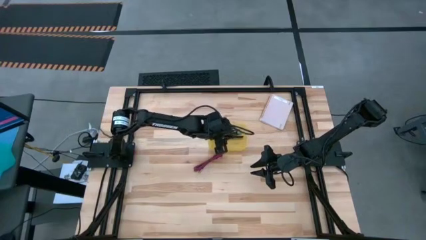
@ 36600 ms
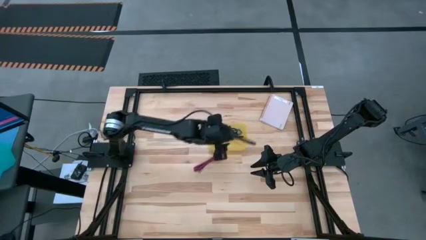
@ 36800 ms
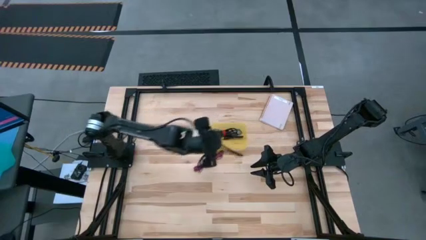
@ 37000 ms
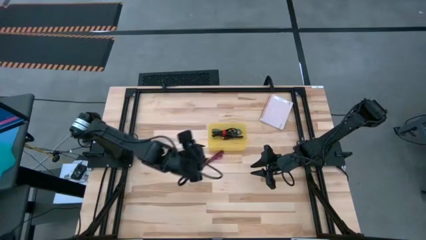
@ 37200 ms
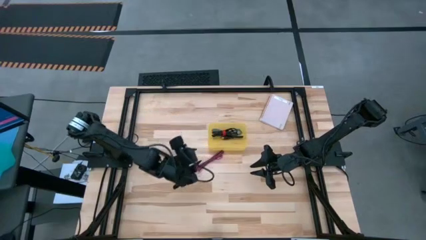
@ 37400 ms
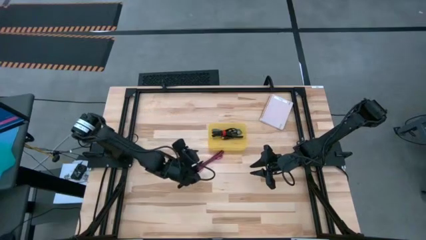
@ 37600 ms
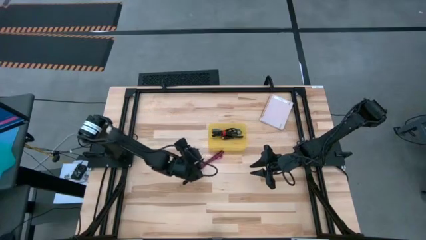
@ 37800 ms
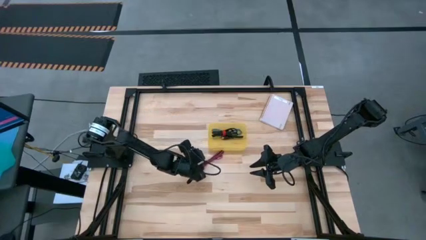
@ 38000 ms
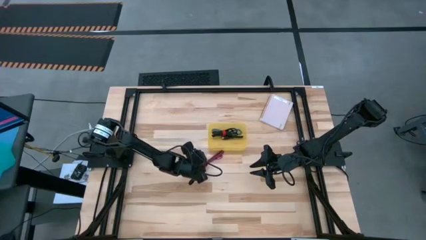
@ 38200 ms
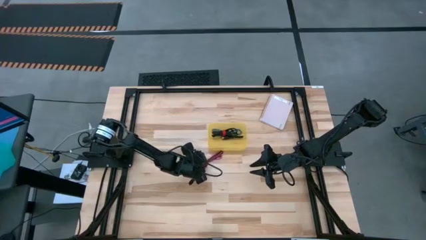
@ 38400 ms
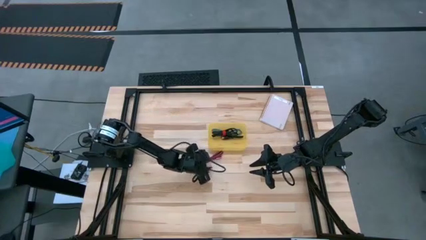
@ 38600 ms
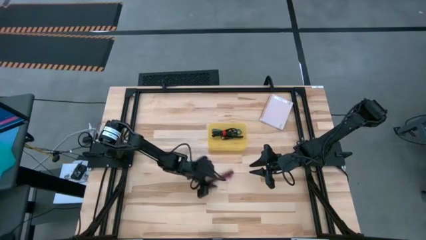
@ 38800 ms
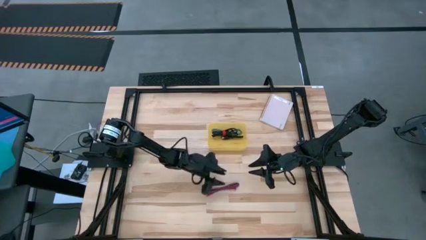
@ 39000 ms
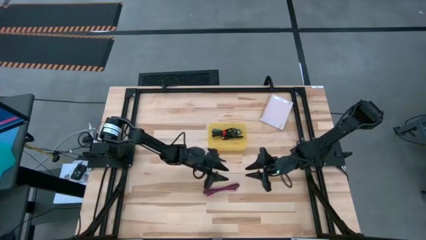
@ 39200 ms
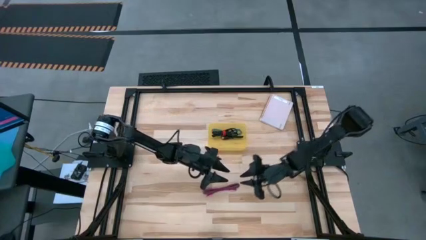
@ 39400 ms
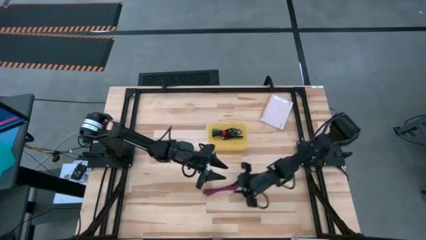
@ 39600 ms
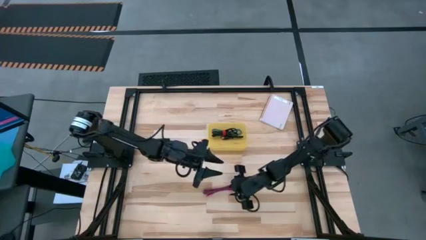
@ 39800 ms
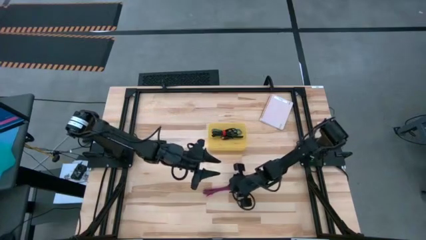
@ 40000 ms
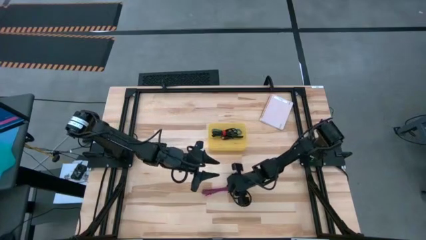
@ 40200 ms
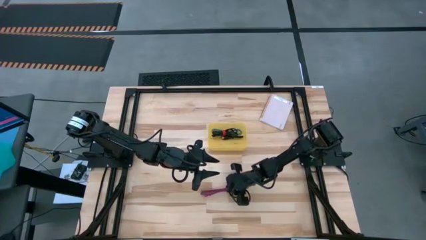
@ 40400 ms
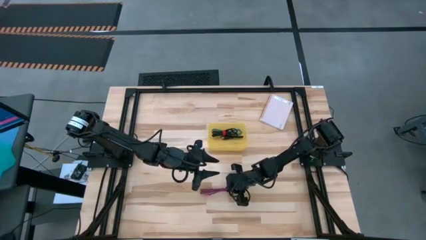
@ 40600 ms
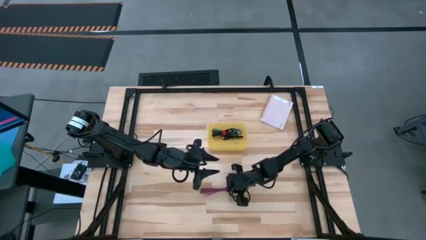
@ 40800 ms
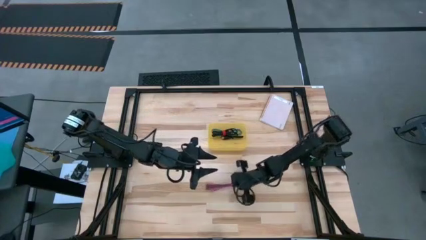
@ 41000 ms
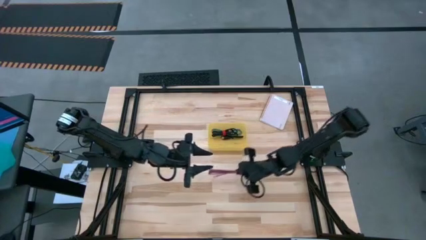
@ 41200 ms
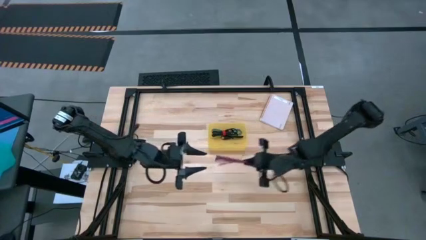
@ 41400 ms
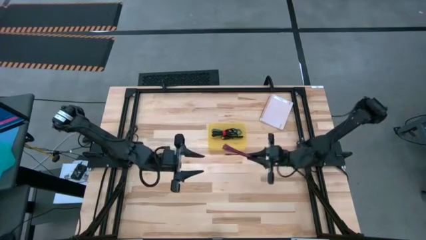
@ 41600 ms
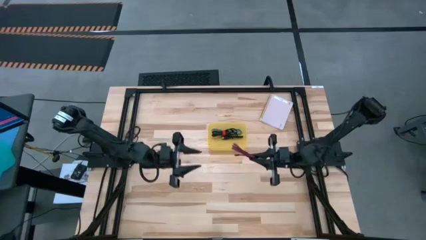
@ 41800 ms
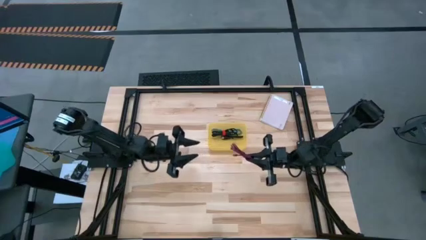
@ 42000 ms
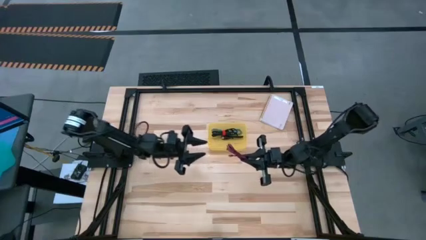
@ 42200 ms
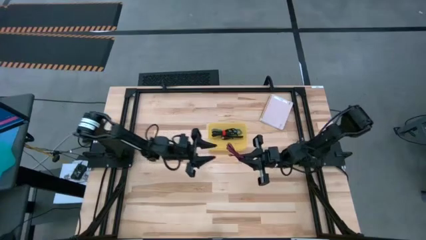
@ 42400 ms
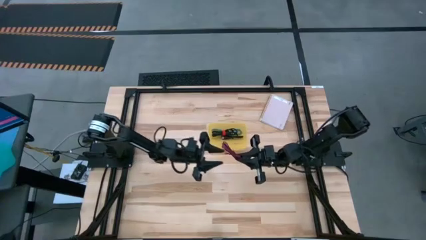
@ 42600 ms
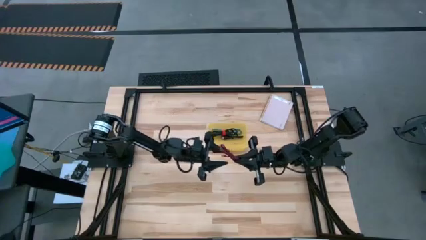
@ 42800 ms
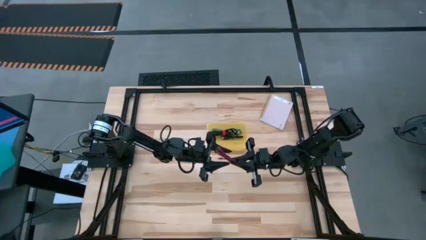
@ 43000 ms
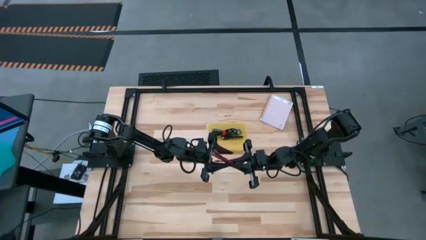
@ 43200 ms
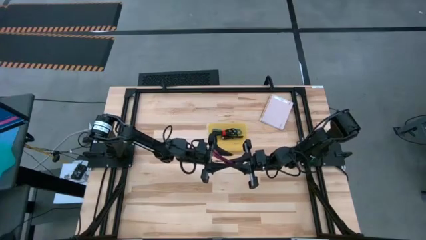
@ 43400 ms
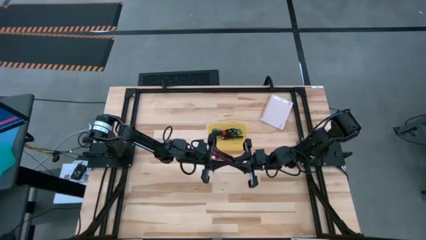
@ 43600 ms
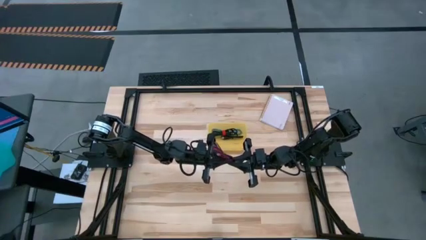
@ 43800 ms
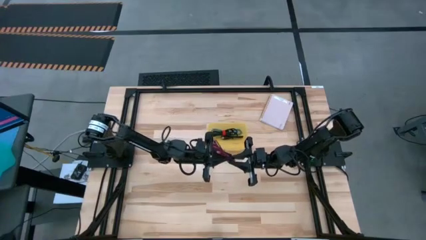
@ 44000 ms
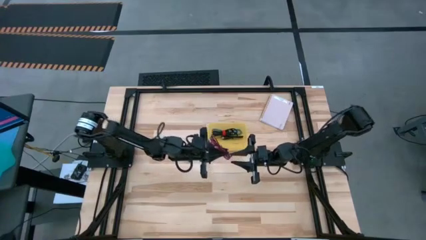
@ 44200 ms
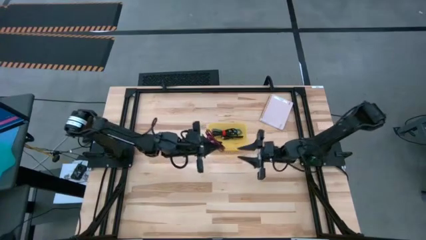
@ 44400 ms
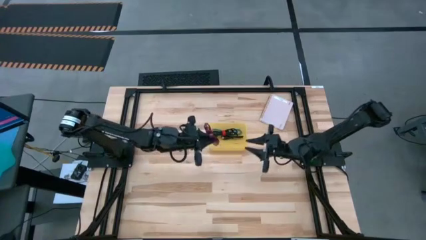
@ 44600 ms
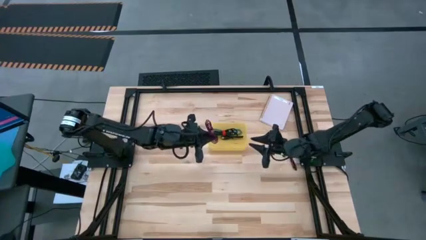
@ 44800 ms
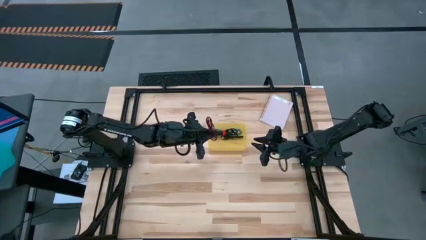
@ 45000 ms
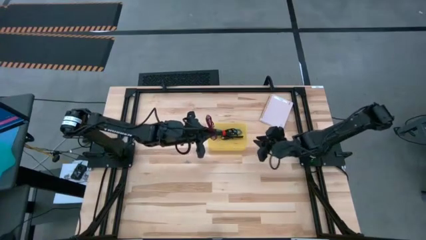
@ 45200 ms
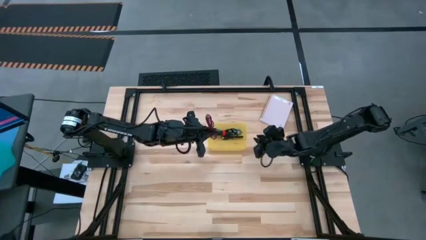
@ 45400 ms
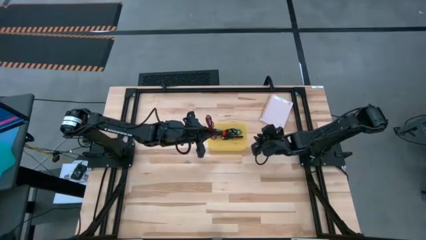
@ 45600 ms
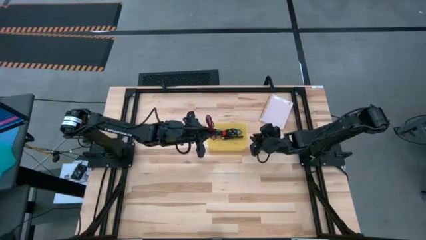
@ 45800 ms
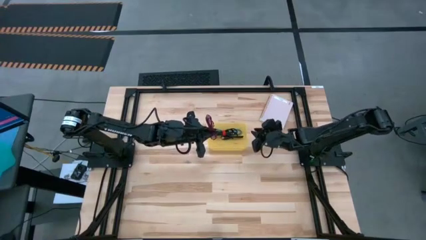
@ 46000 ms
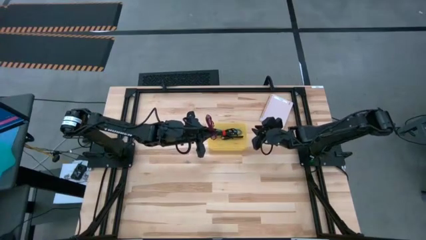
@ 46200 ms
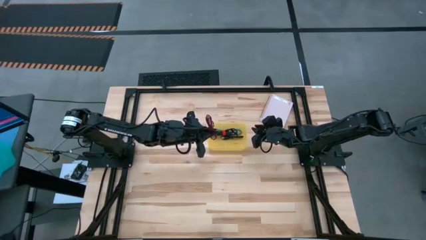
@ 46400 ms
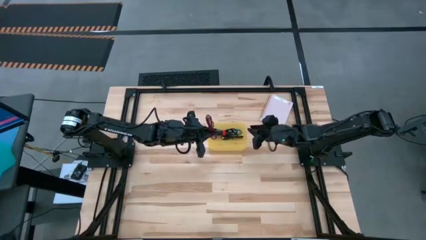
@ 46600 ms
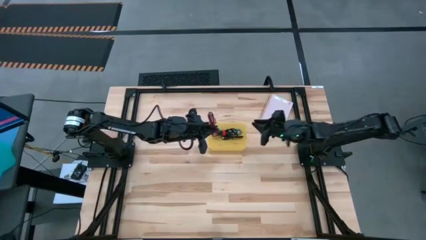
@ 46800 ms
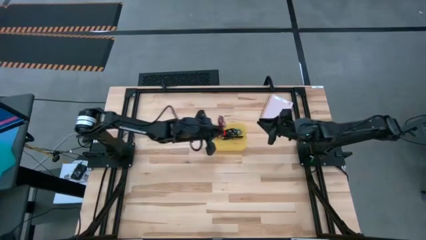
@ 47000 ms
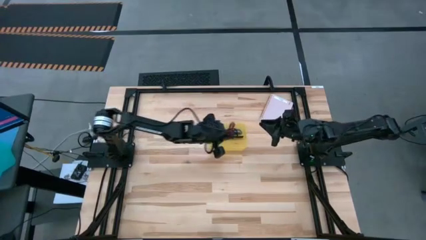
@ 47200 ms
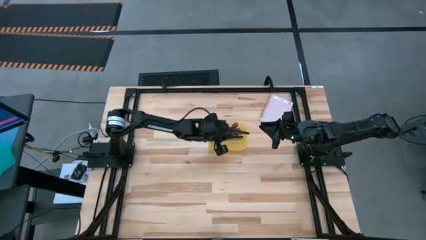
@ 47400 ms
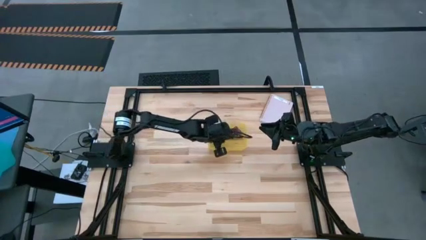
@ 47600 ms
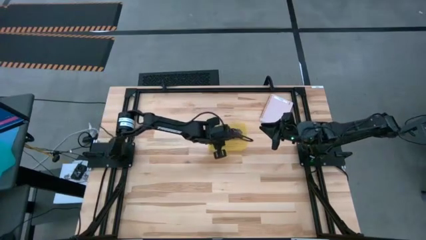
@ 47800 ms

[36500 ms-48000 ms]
Task: Pick and place USB-C Cables
Put the pink charger cable into the yellow bin
